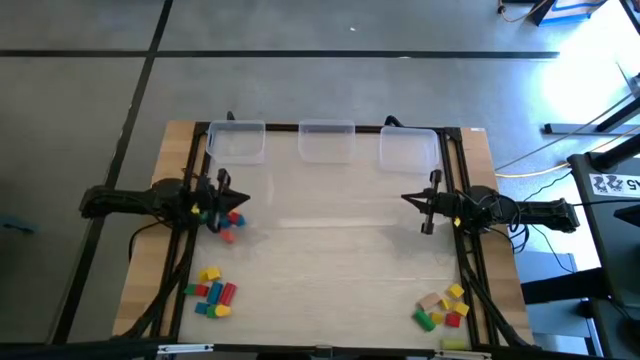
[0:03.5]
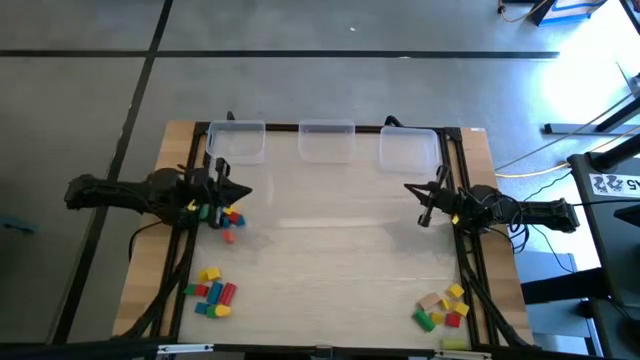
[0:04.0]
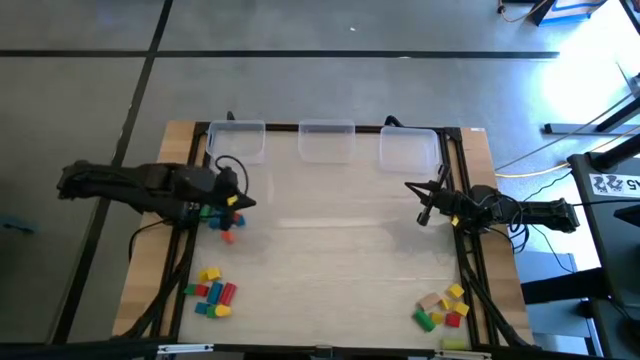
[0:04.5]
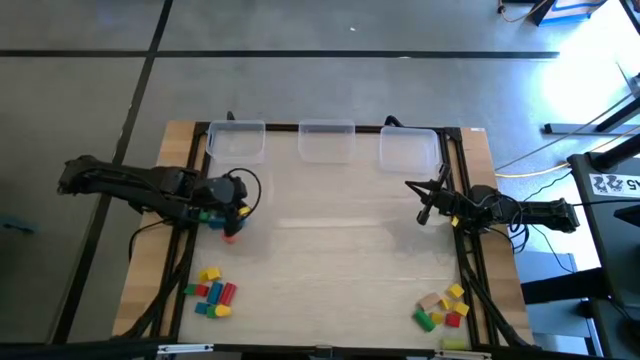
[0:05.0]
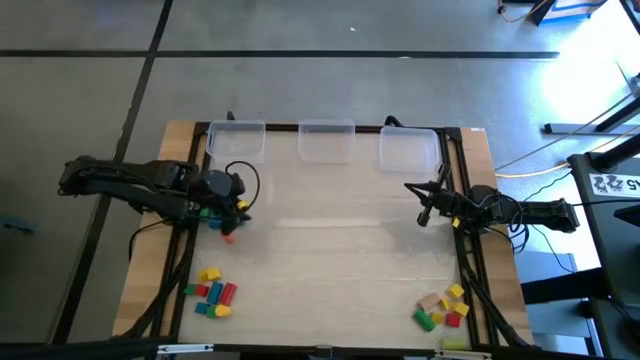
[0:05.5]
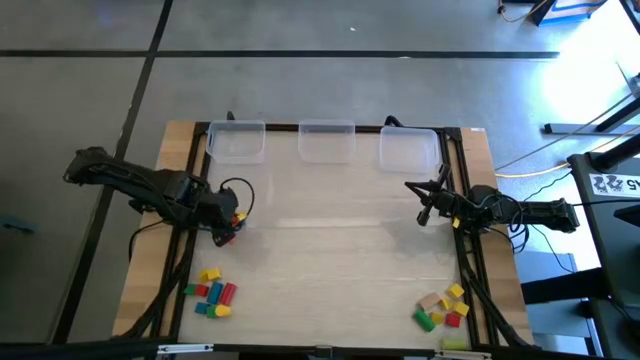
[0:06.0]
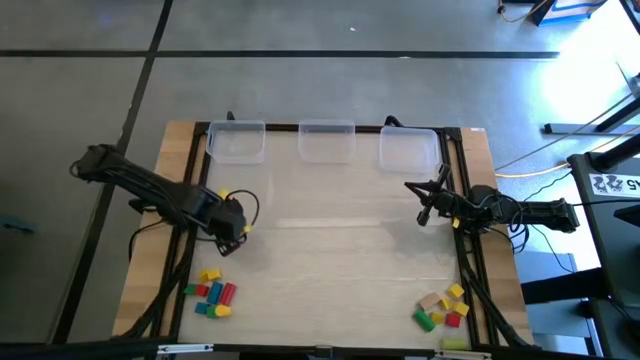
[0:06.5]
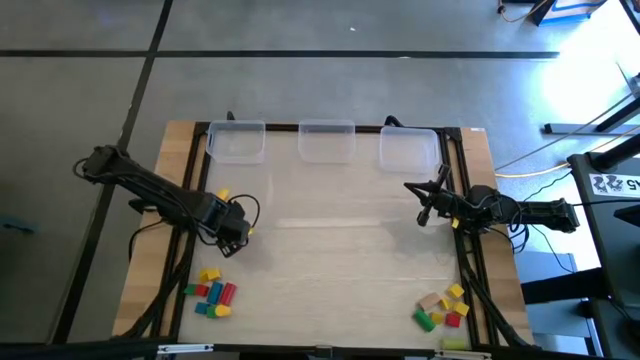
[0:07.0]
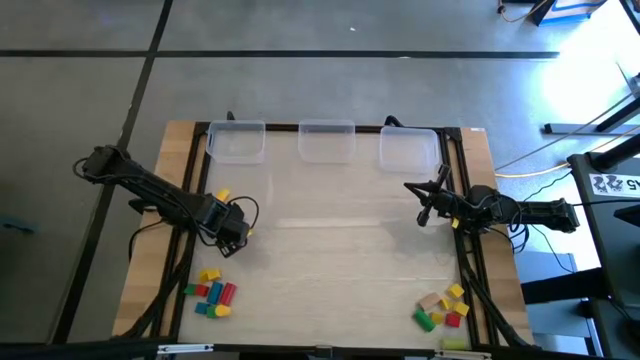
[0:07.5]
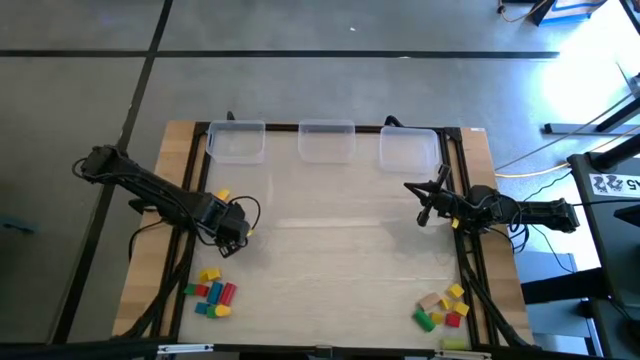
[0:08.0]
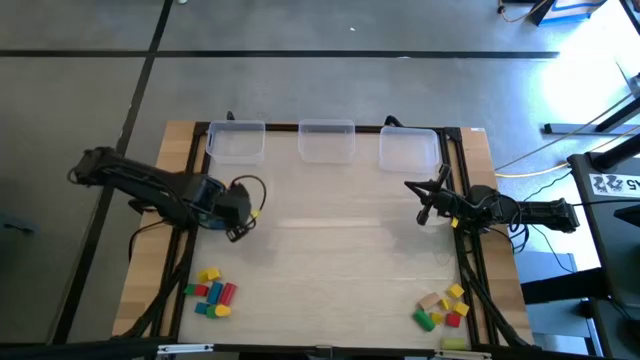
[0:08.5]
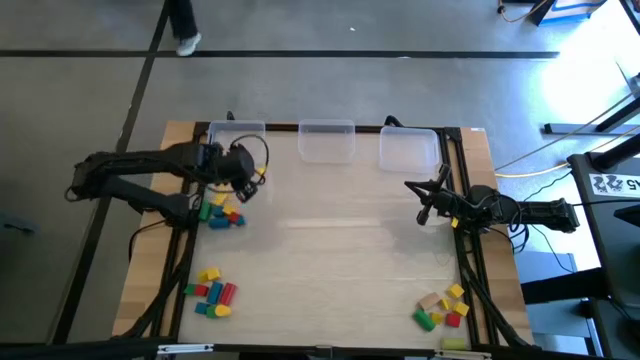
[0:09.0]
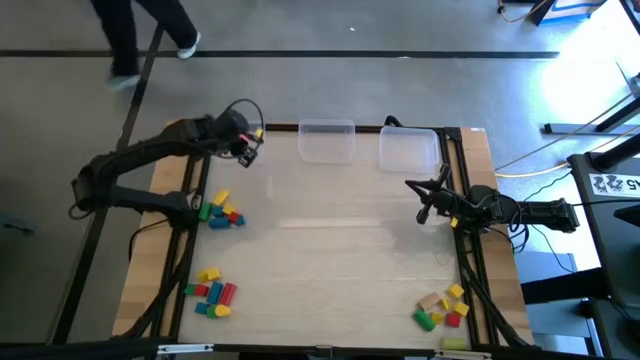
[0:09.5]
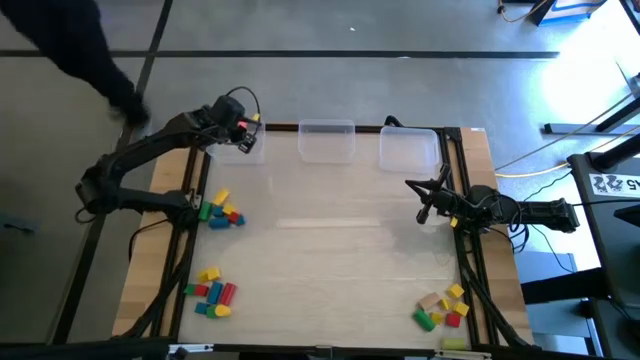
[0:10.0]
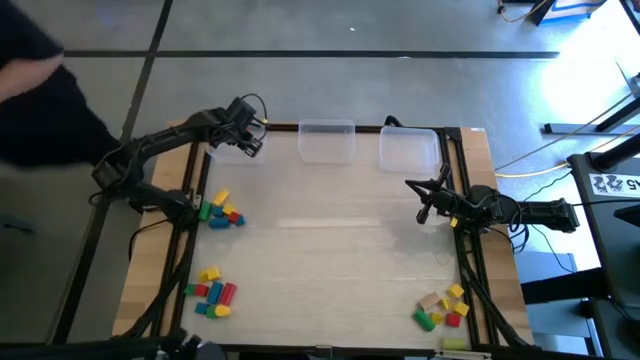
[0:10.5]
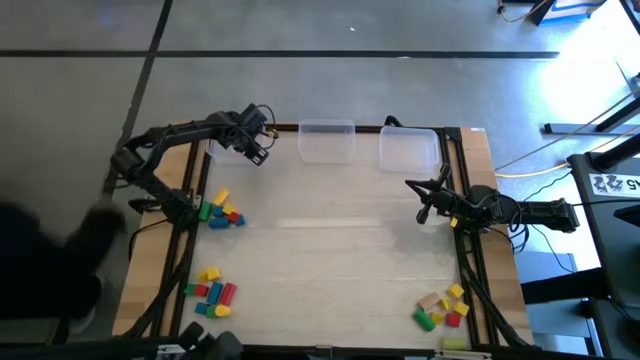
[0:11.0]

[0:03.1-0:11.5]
Task: Sort blocks by size
Put the cylindrical orange block into the left transparent bin

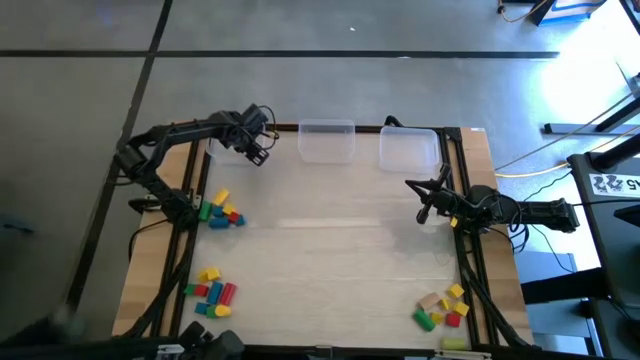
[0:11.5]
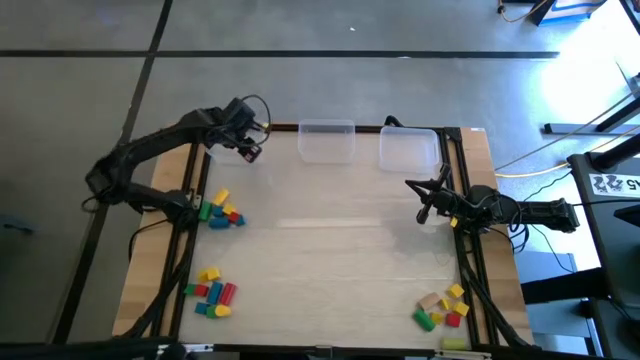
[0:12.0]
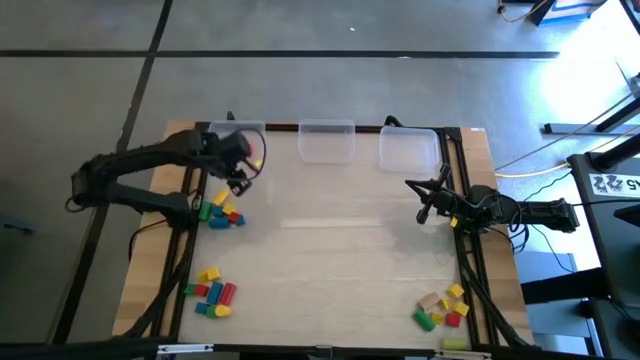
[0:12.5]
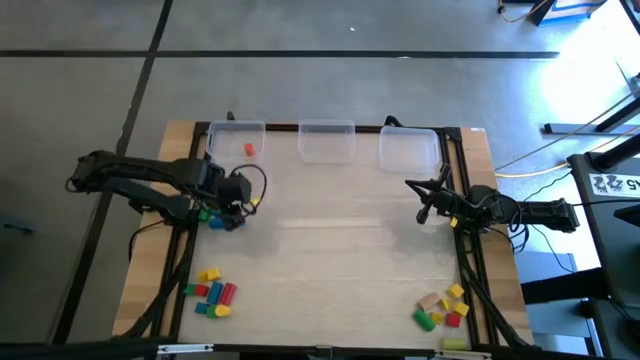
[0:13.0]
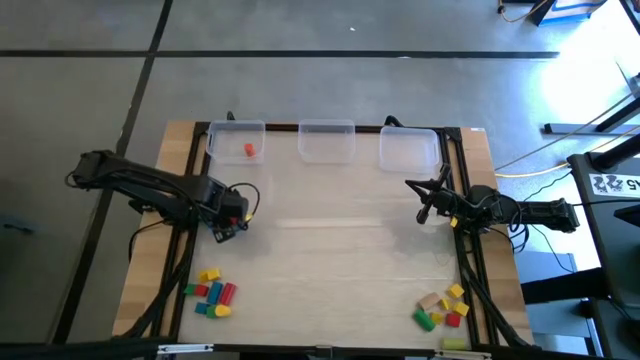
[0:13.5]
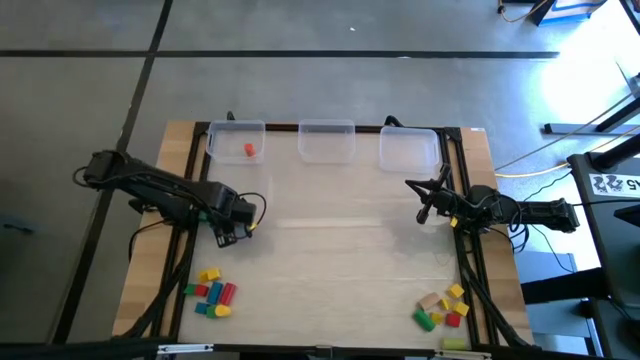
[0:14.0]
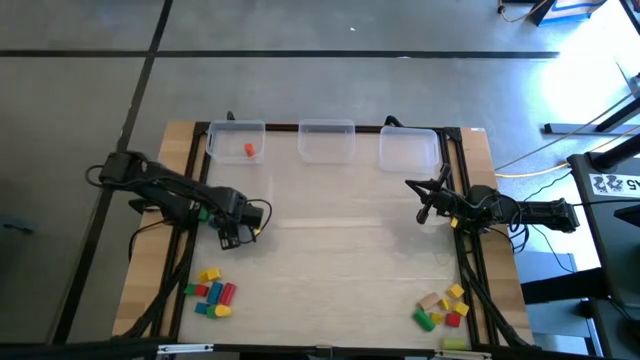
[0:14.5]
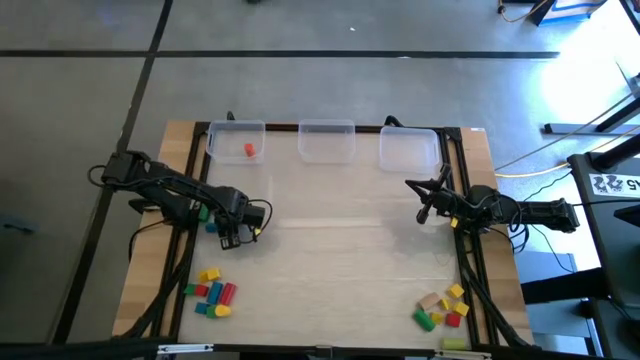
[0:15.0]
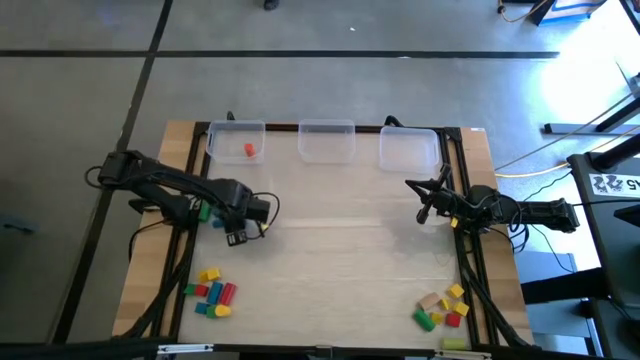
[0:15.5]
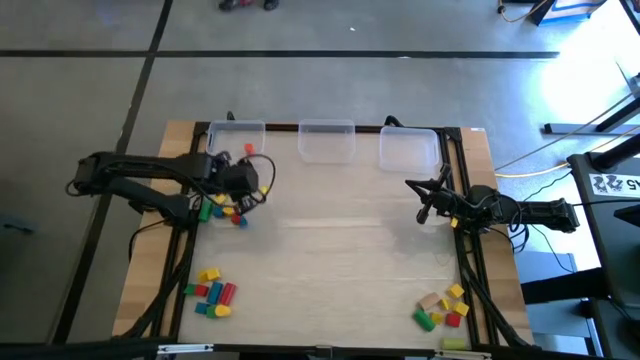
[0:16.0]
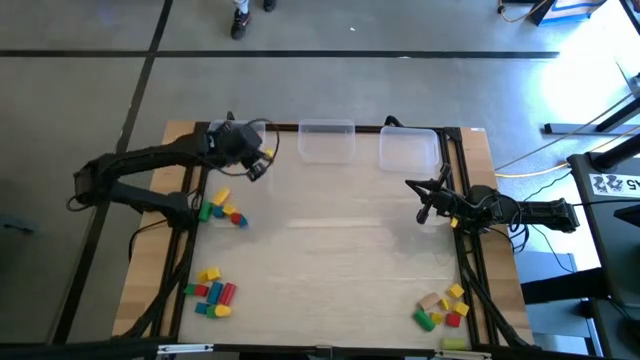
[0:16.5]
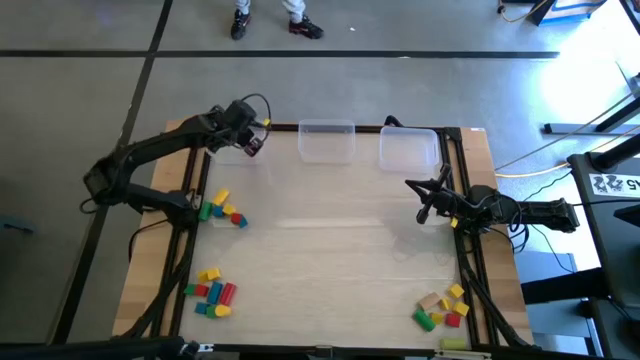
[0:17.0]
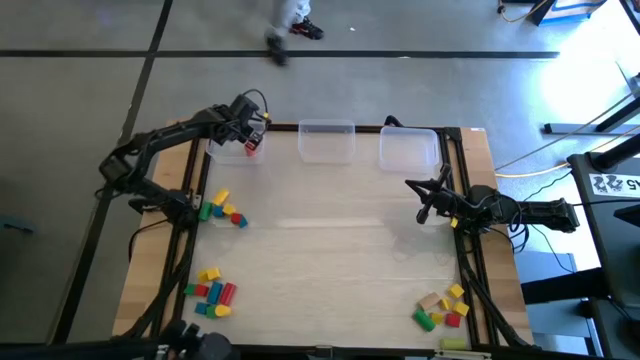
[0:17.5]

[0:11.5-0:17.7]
Put the cylindrical blue block into the left transparent bin

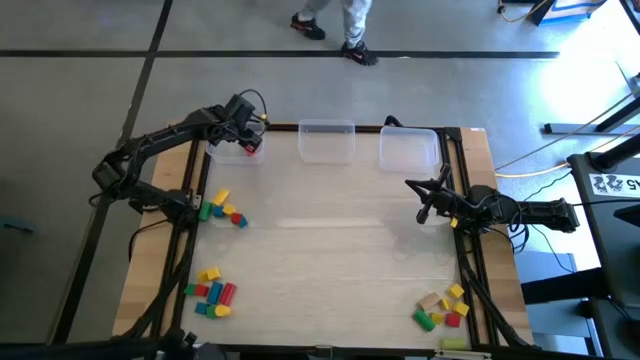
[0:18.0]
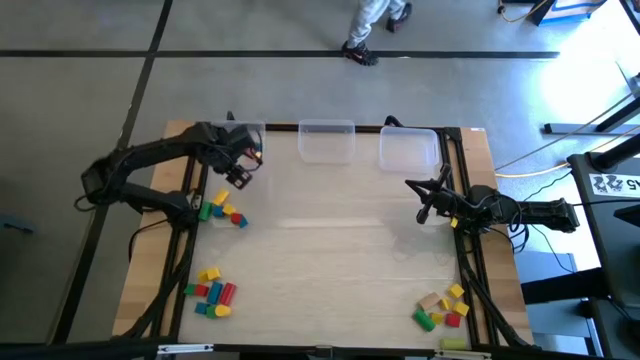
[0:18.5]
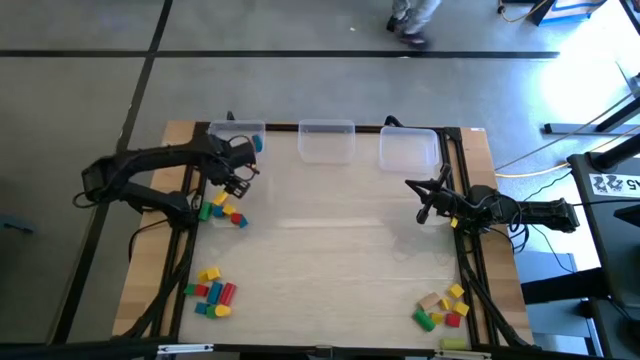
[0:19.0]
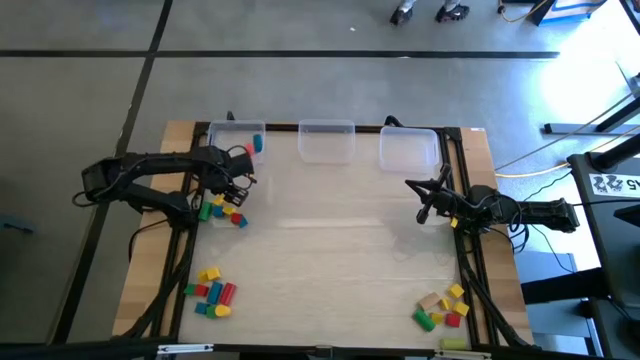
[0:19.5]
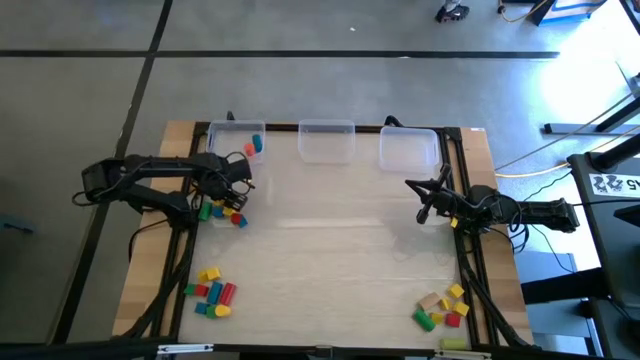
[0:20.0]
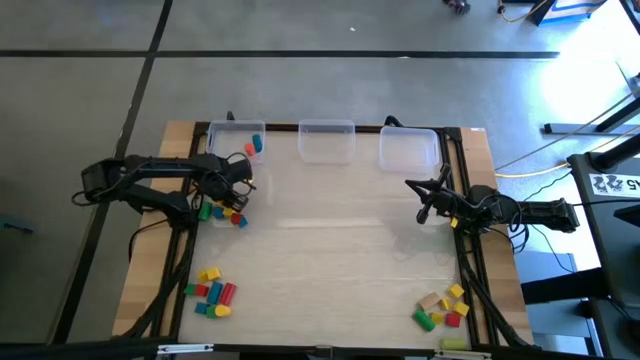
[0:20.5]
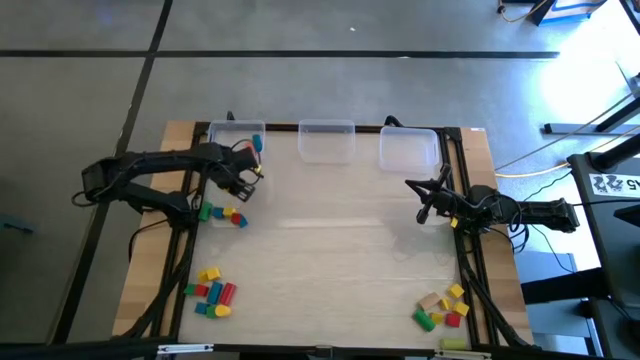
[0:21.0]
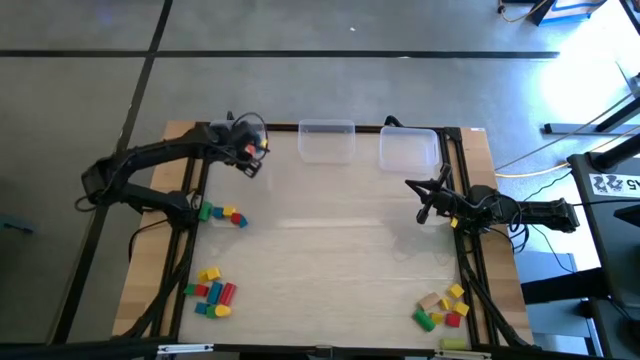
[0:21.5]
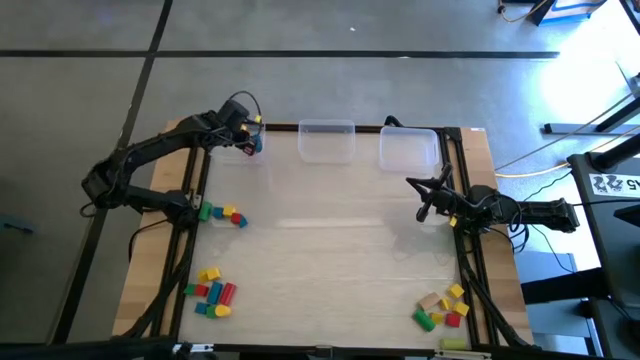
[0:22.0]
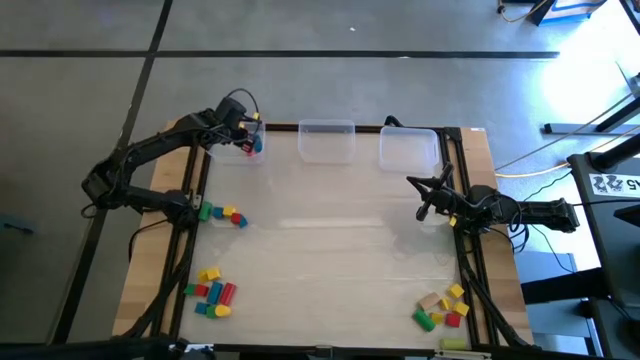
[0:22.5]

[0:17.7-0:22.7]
Put the cylindrical yellow block into the left transparent bin

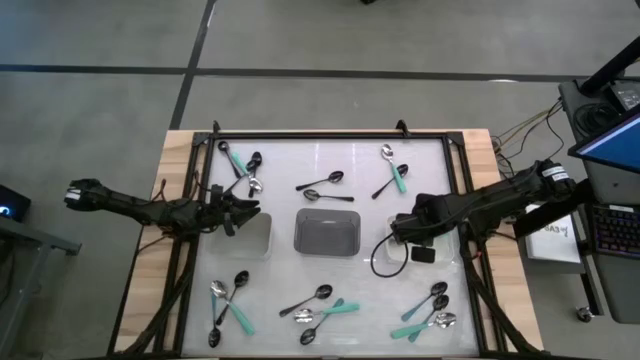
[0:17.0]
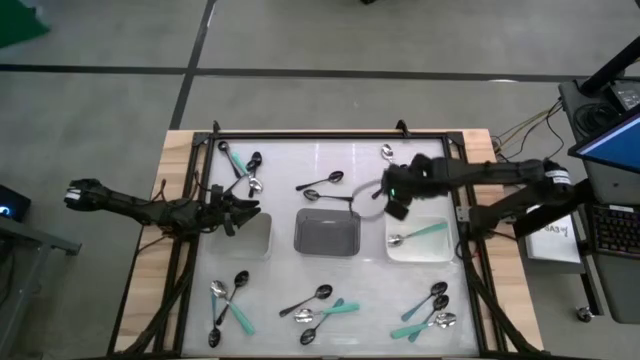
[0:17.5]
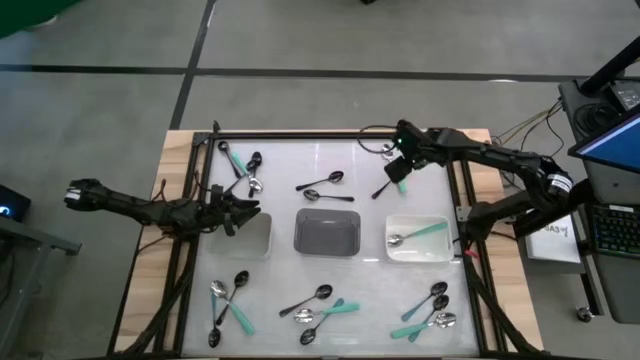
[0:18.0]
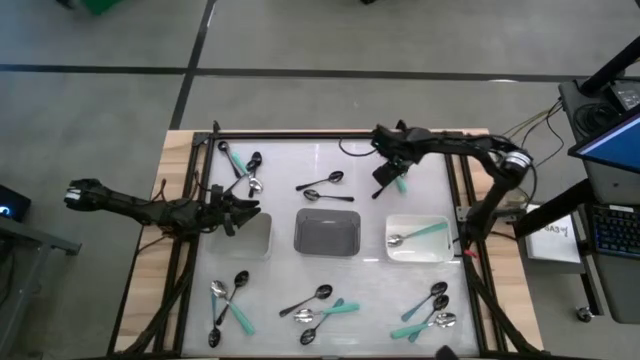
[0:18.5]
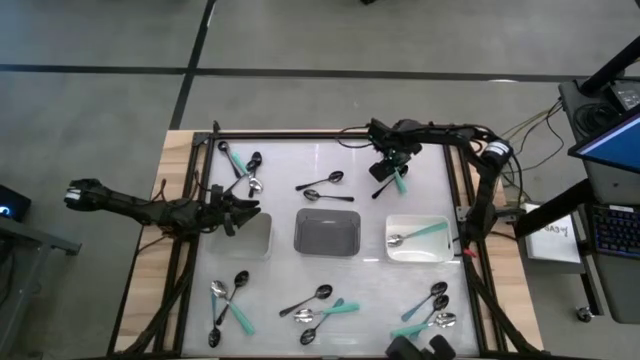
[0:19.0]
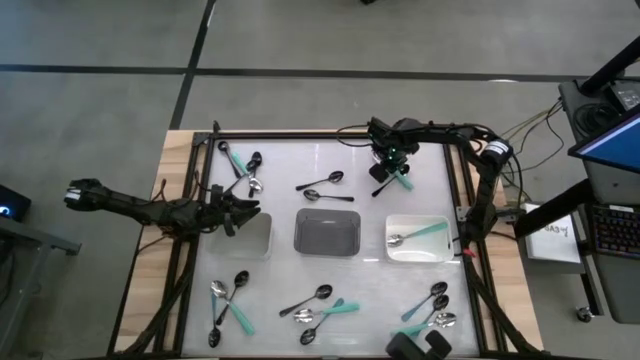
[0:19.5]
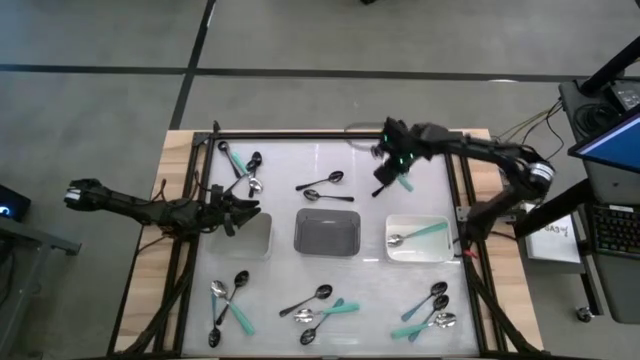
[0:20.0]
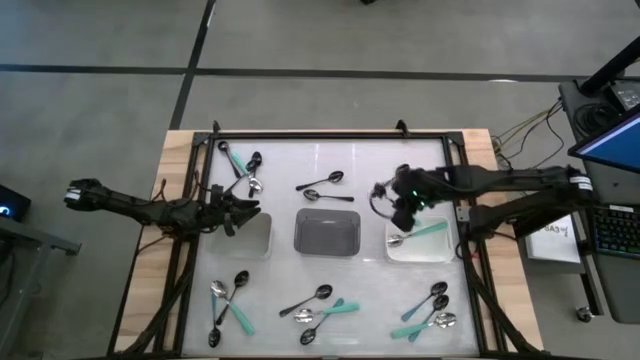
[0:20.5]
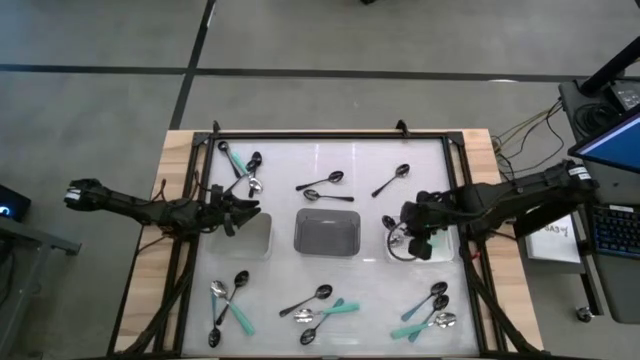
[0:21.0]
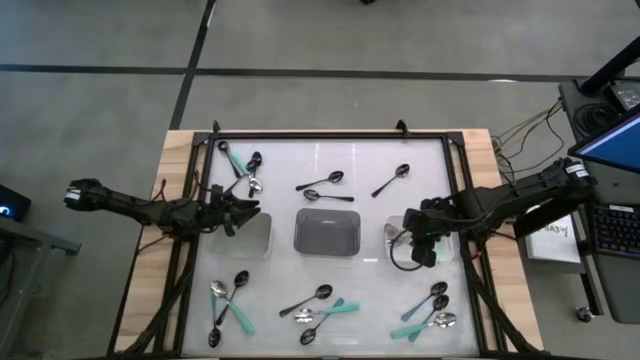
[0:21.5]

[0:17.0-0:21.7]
Task: Sort silverware by color (type)
Put the green spoon into the white bin
